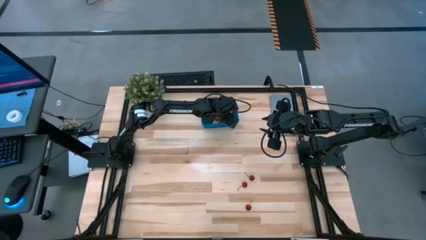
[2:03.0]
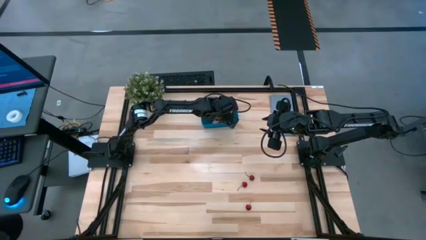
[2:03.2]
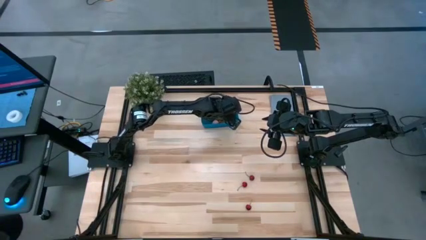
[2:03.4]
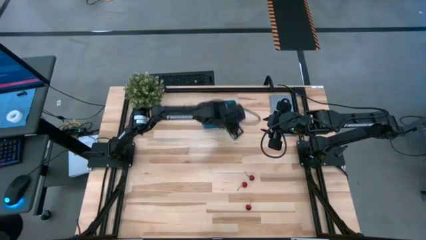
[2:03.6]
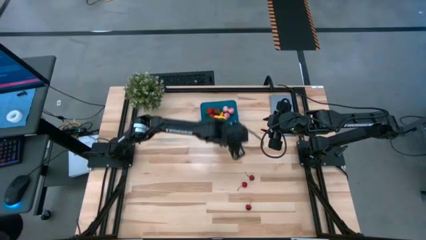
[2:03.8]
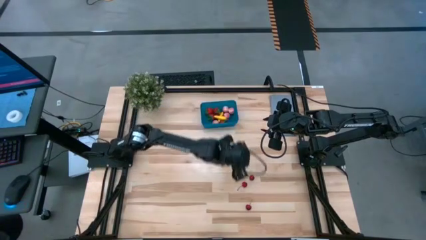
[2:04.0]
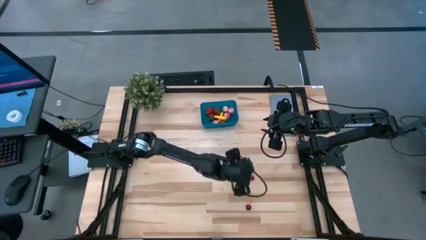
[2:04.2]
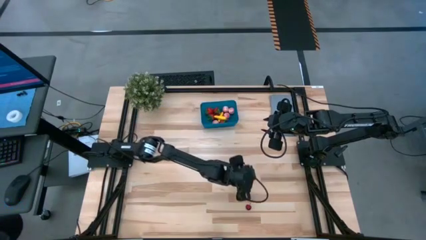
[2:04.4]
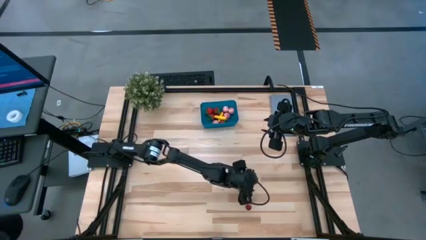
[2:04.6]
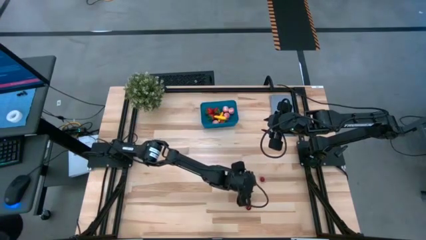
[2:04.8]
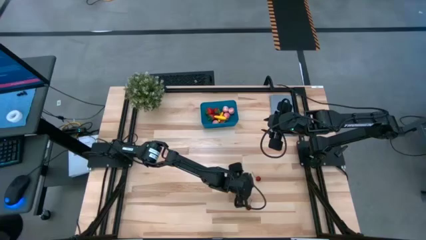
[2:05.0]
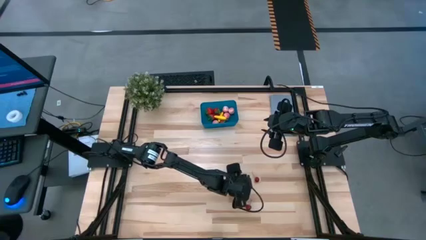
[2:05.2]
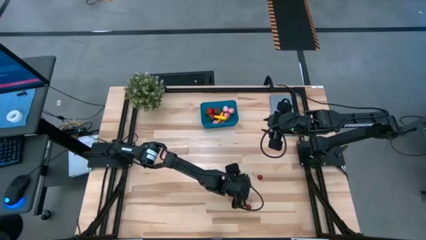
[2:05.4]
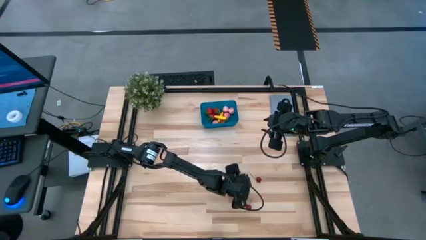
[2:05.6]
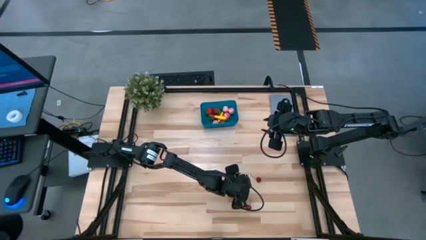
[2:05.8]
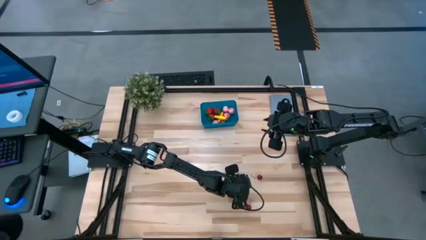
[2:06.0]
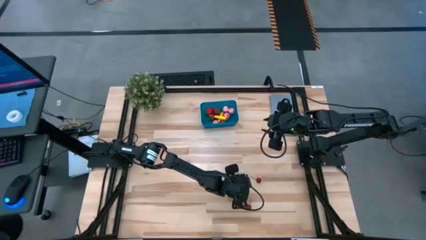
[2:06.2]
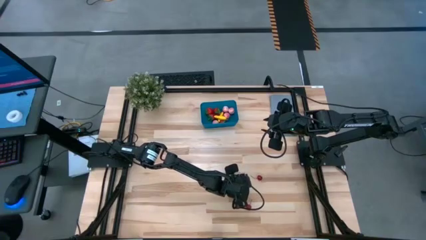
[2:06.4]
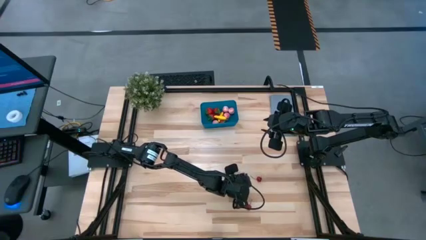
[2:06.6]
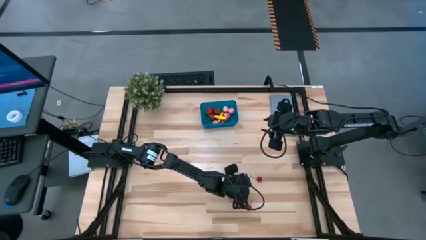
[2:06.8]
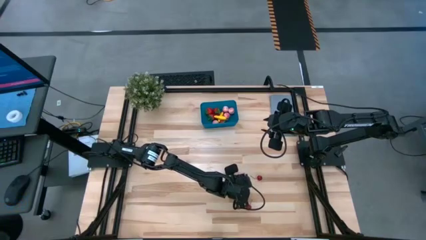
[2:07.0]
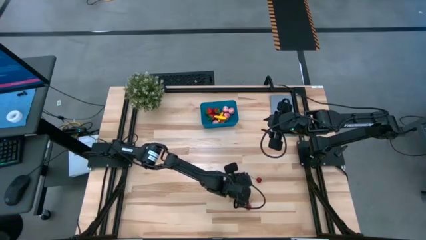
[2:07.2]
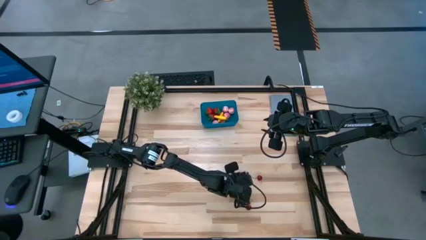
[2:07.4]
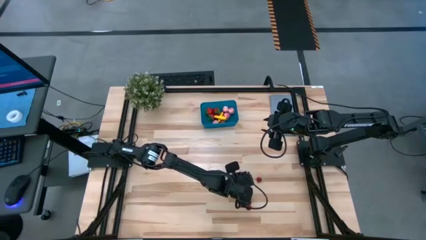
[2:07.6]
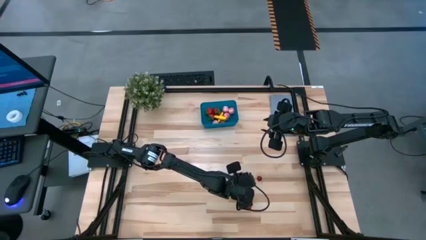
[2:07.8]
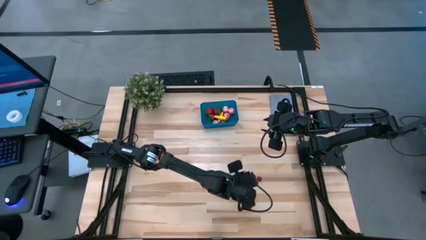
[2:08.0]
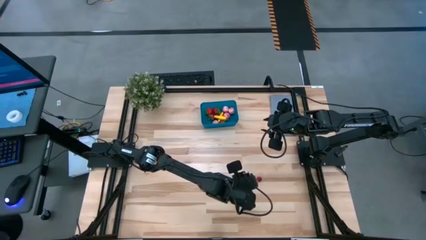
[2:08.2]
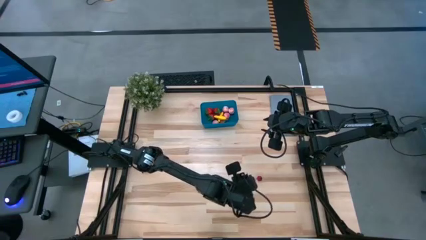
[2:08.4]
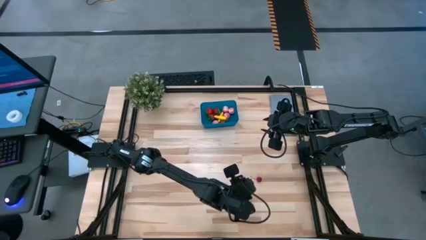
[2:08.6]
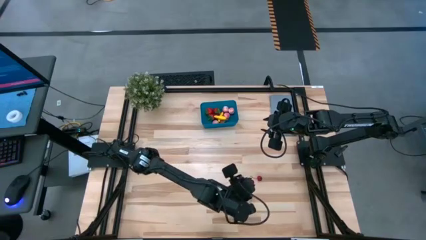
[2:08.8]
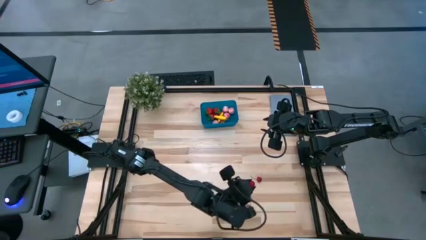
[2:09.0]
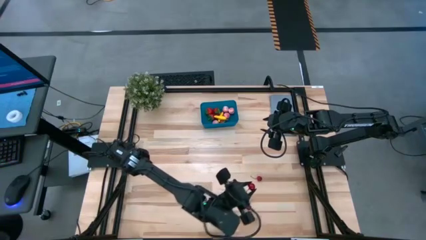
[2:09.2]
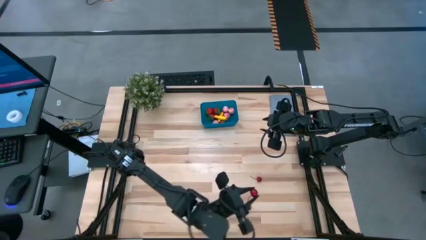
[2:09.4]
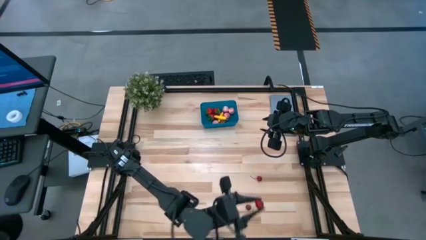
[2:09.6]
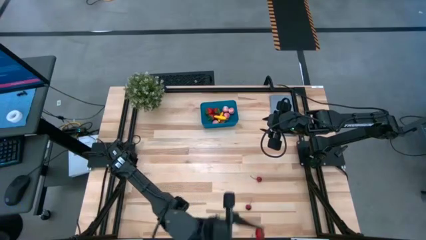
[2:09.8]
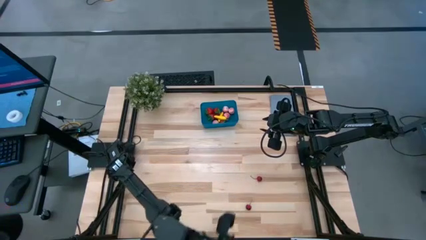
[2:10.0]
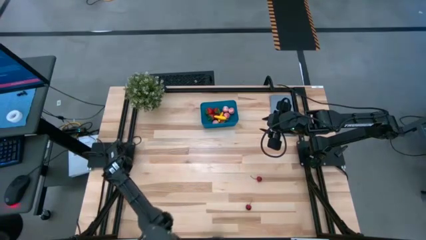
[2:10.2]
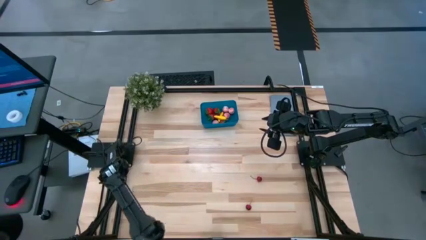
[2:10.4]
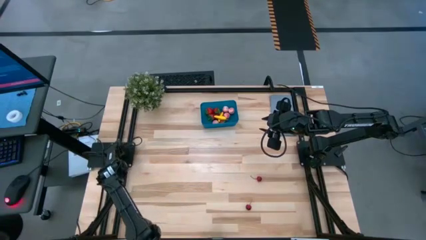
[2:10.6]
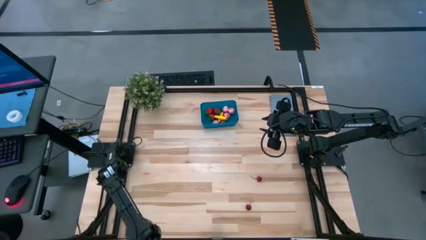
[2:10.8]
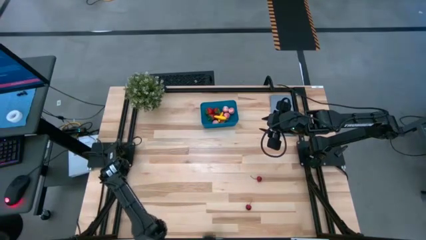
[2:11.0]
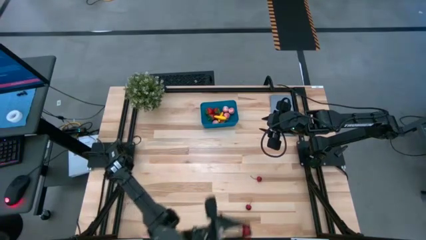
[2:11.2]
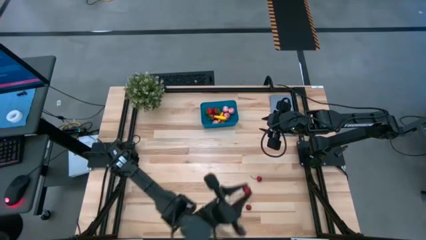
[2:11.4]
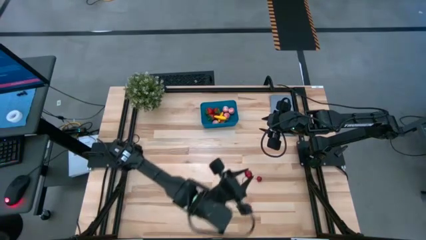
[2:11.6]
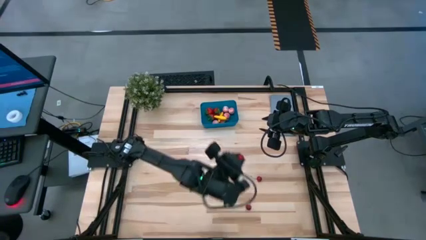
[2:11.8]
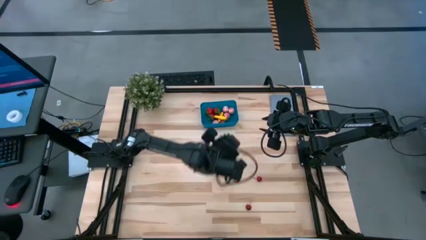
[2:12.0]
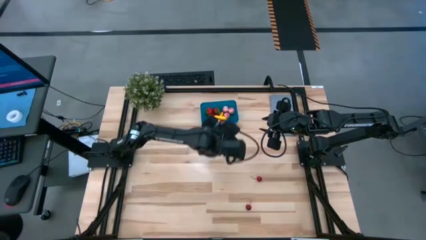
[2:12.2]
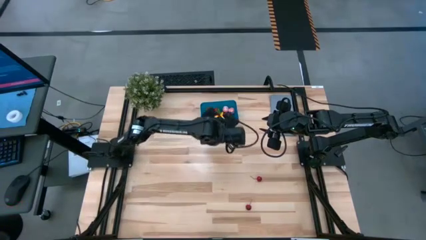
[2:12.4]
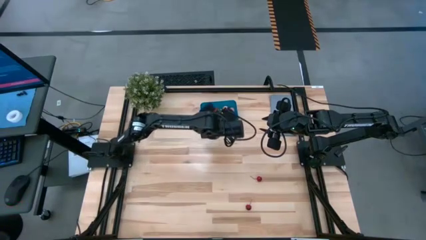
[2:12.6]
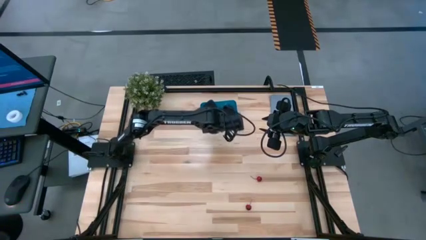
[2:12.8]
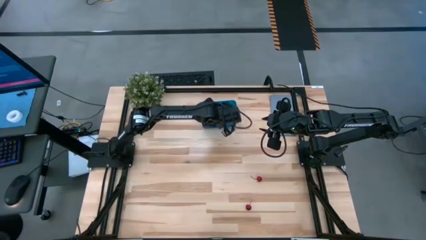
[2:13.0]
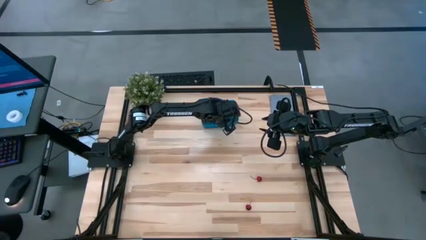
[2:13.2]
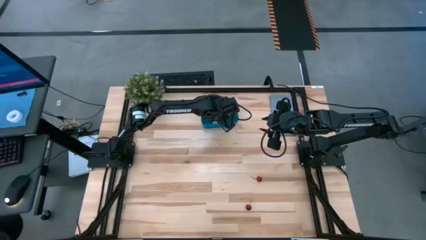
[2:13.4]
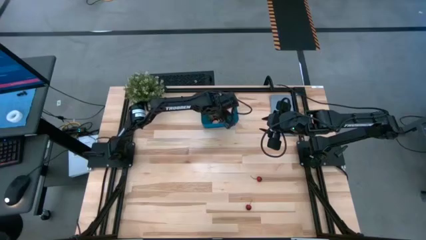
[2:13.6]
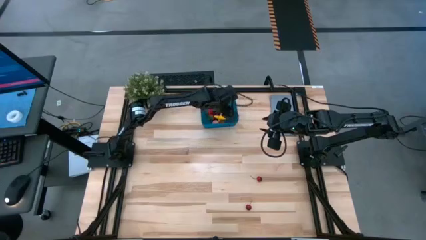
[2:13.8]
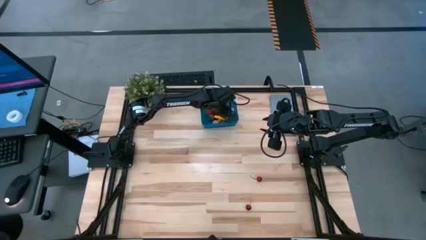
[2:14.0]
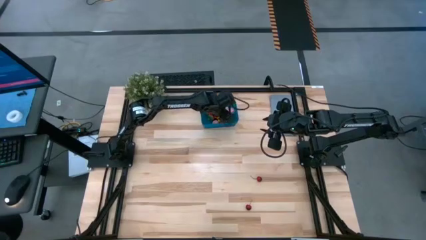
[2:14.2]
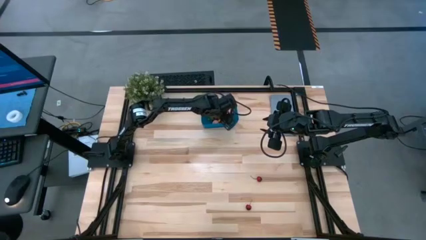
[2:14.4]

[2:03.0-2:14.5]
Task: Pick and placing Produce into tupperware
Put the cherry into the blue bin

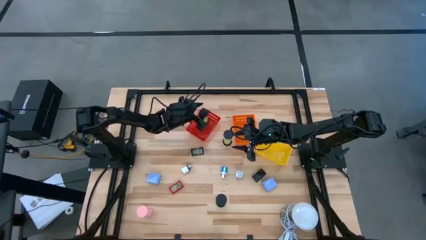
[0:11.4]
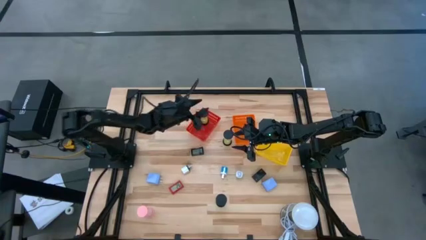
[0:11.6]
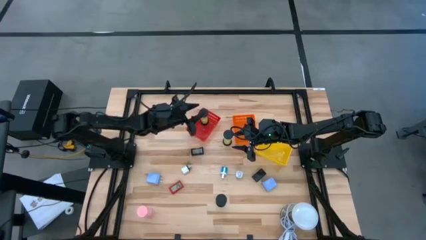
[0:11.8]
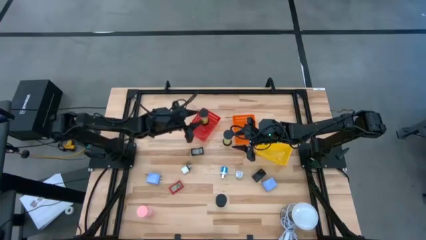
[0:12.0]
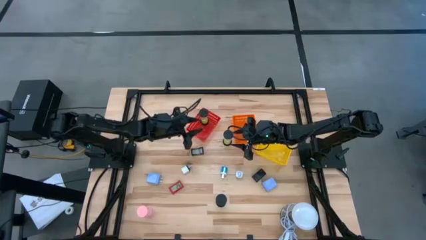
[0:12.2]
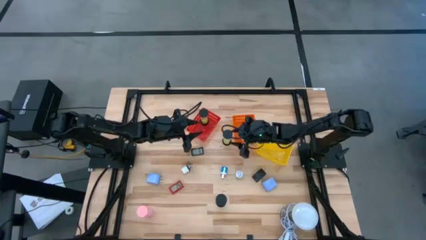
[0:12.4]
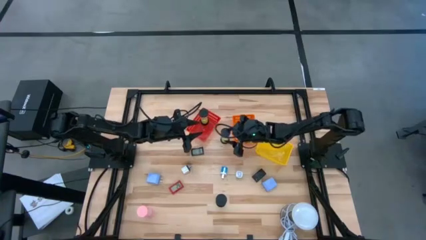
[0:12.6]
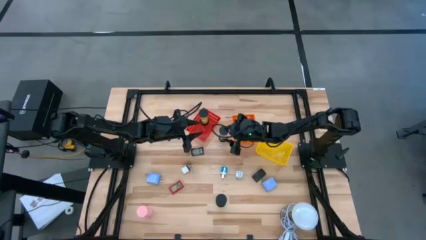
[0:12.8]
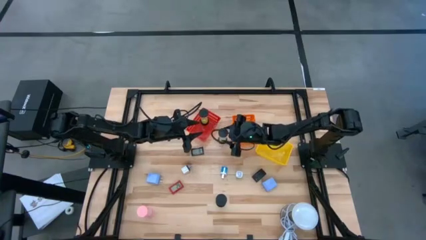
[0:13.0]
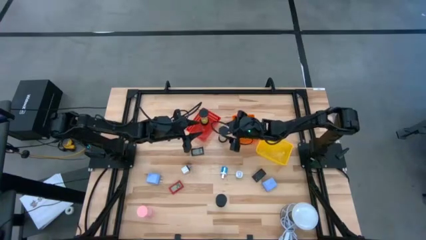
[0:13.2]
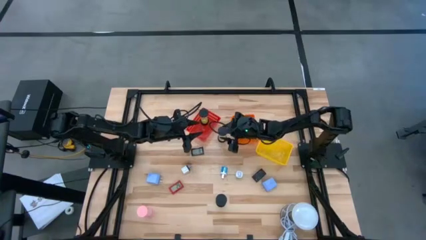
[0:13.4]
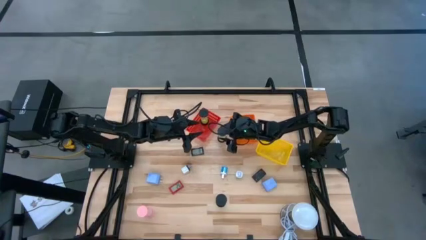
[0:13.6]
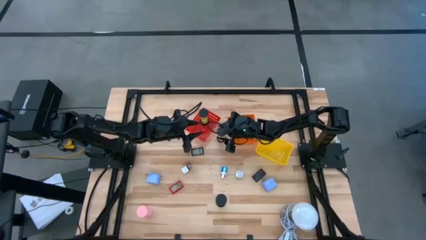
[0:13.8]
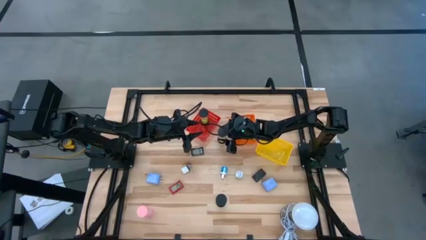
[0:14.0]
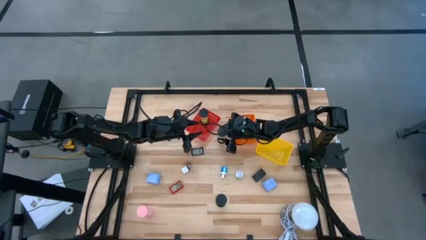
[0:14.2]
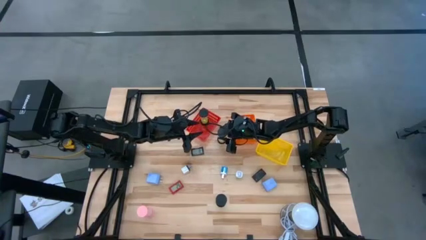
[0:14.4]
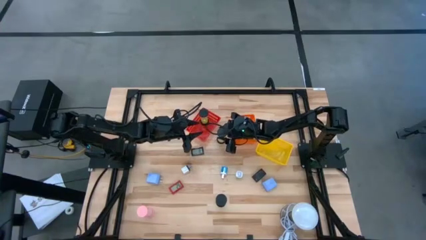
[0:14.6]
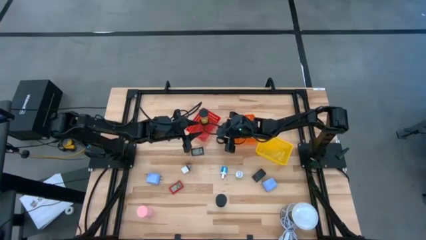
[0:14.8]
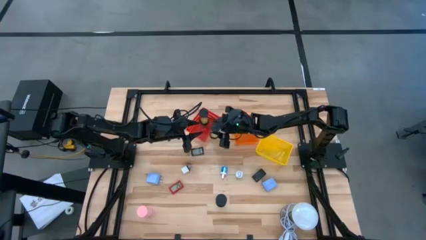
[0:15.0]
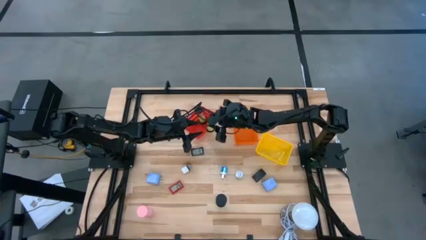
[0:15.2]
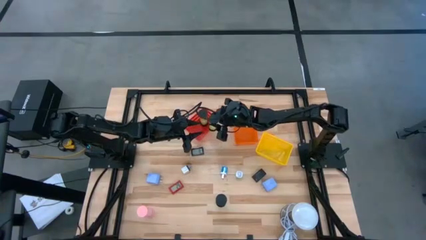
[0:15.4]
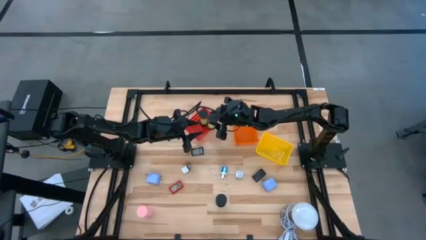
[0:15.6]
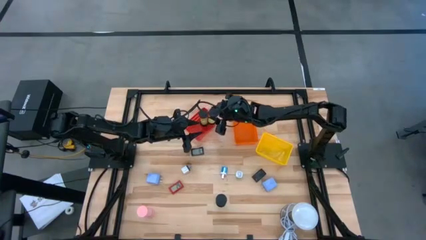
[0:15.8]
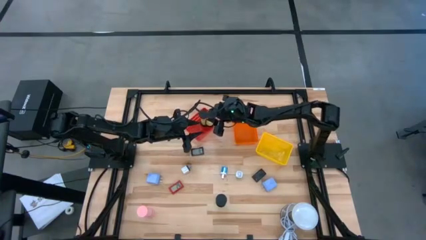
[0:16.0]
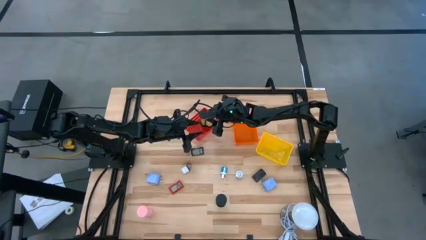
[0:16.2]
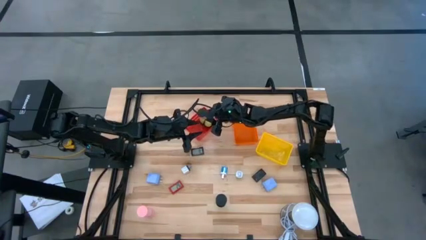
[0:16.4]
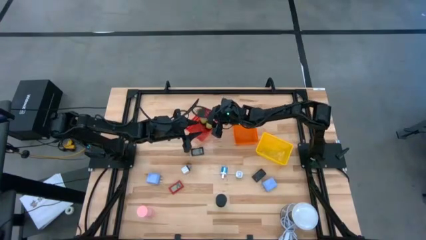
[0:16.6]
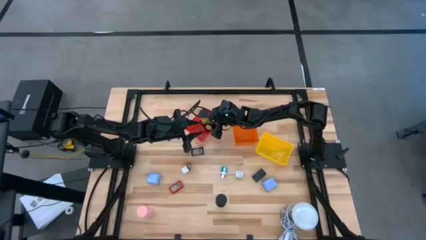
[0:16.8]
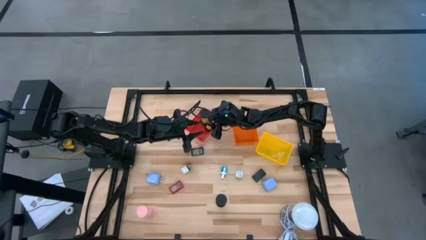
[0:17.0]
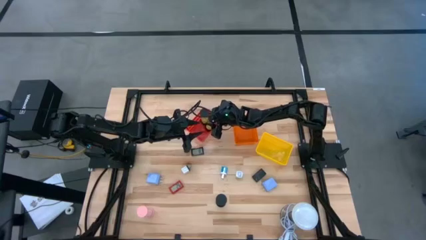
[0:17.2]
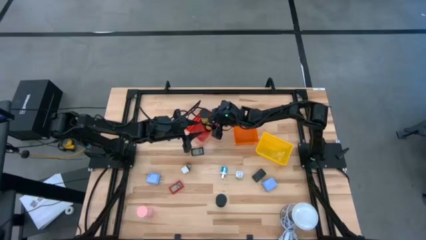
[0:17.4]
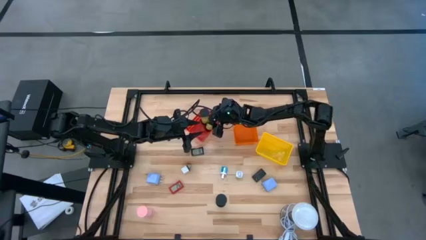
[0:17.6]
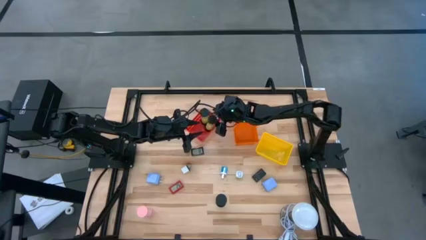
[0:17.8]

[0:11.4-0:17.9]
Task: Pick & Place Office items
Put the green hourglass into the red bin
